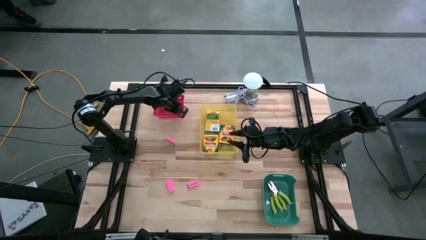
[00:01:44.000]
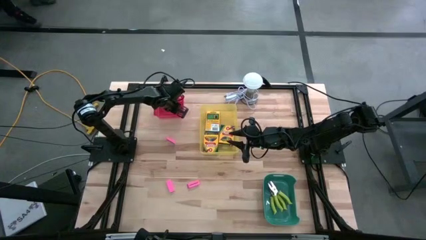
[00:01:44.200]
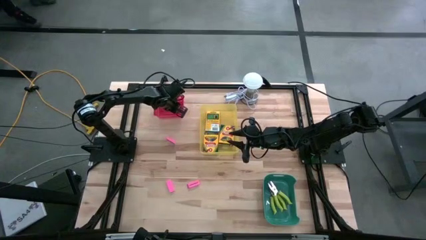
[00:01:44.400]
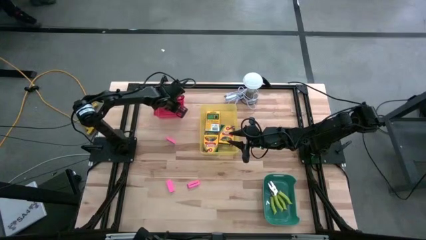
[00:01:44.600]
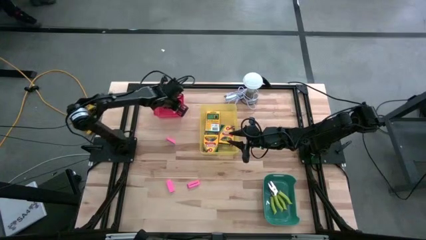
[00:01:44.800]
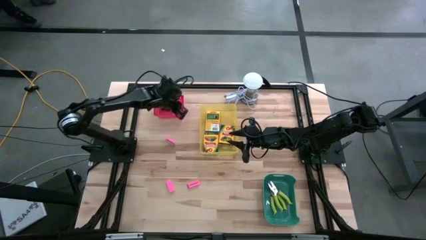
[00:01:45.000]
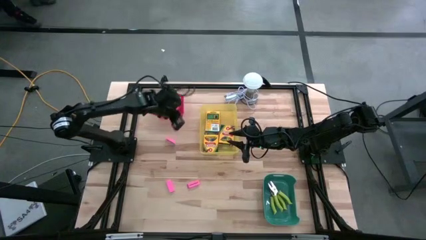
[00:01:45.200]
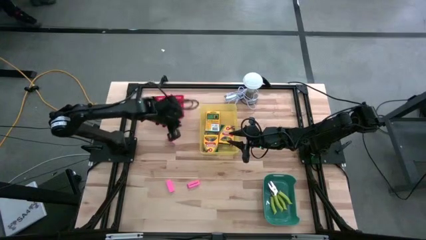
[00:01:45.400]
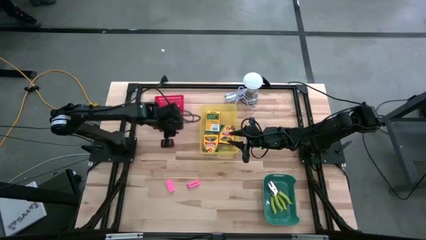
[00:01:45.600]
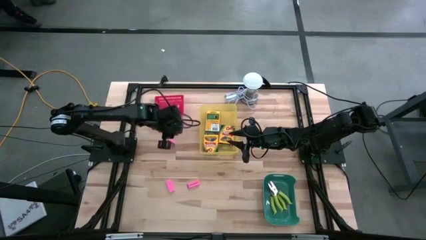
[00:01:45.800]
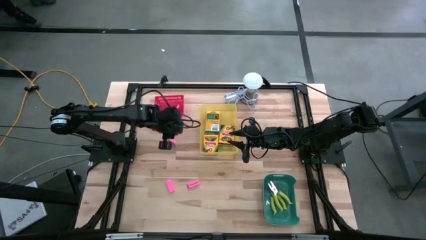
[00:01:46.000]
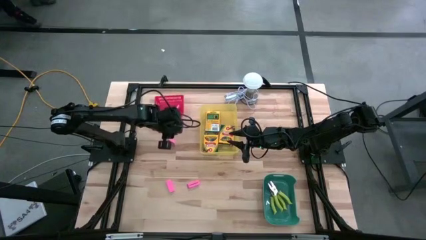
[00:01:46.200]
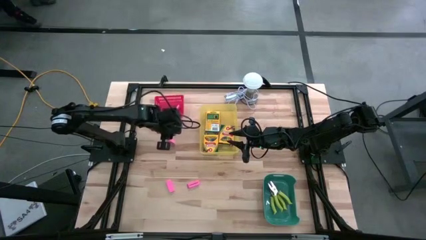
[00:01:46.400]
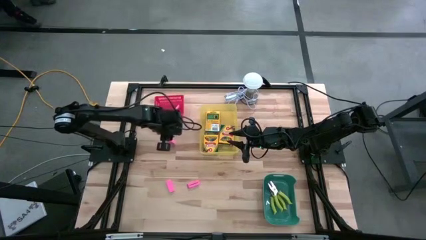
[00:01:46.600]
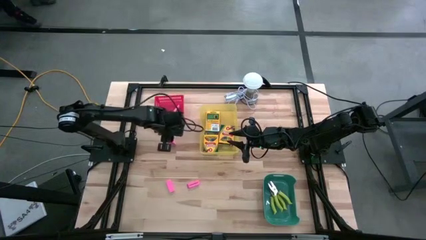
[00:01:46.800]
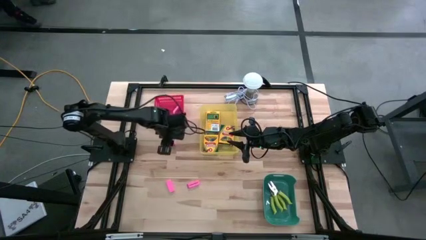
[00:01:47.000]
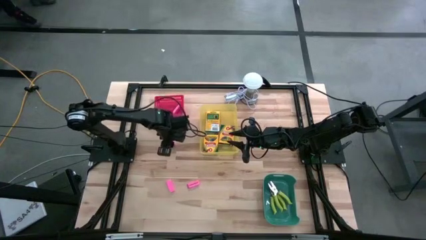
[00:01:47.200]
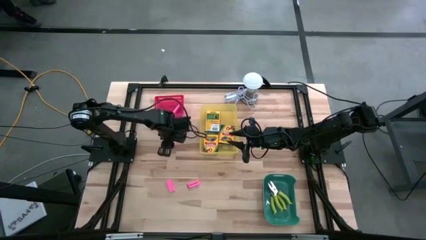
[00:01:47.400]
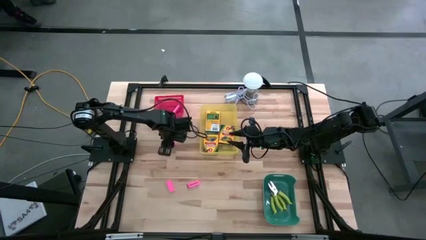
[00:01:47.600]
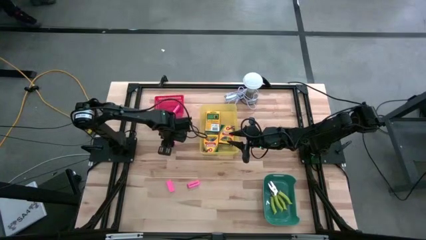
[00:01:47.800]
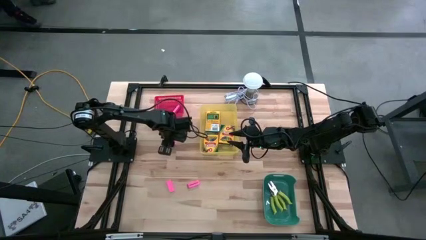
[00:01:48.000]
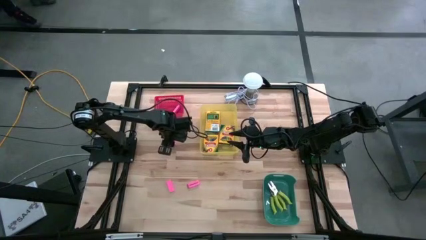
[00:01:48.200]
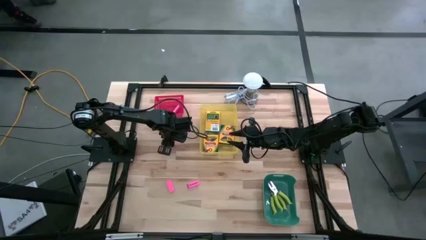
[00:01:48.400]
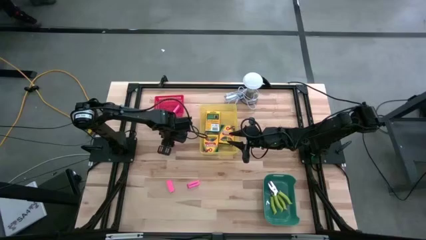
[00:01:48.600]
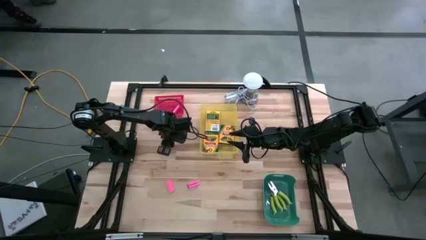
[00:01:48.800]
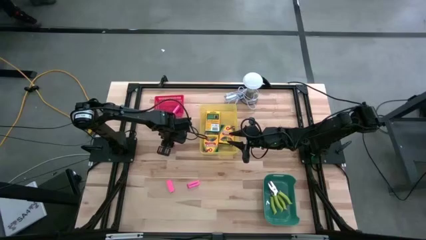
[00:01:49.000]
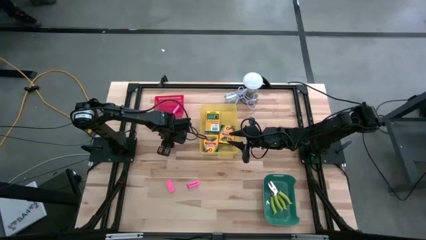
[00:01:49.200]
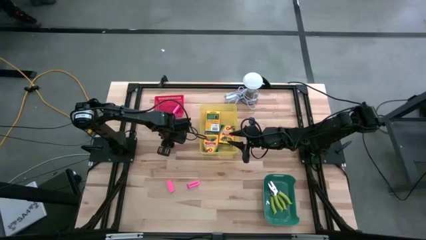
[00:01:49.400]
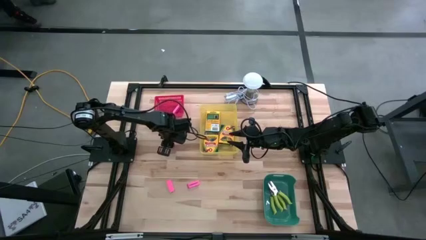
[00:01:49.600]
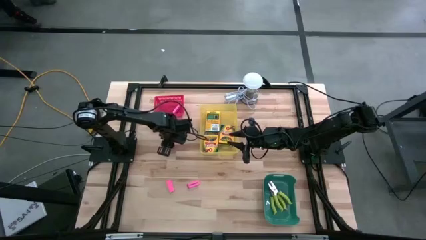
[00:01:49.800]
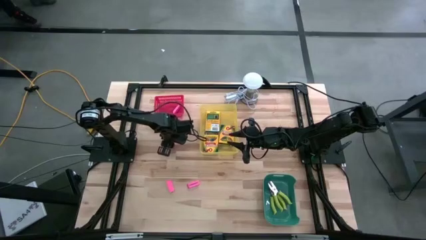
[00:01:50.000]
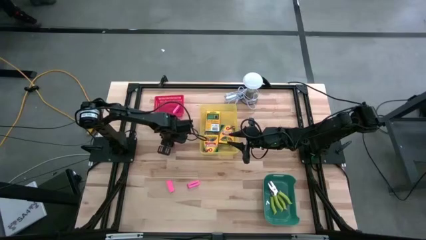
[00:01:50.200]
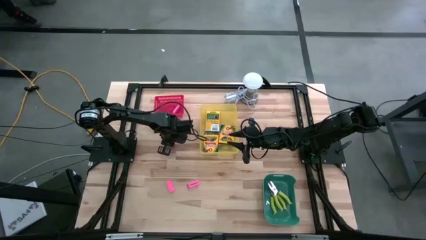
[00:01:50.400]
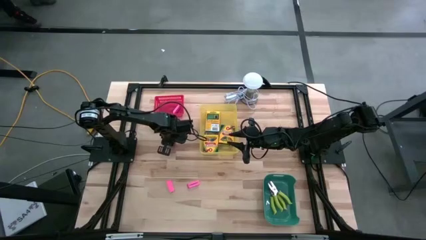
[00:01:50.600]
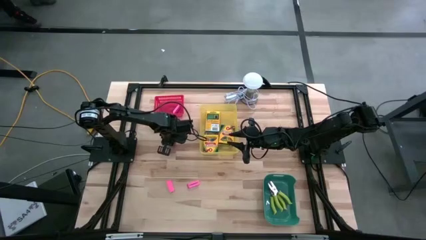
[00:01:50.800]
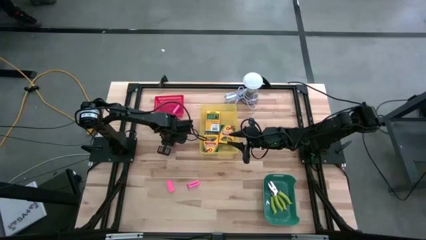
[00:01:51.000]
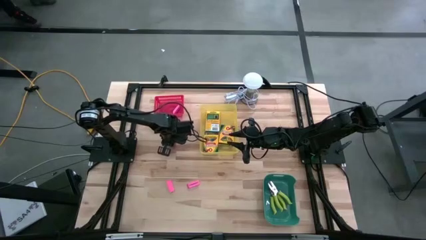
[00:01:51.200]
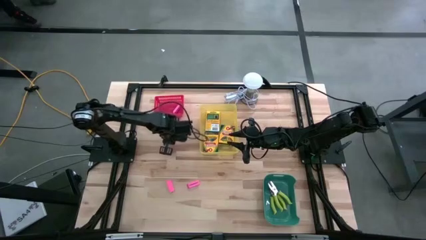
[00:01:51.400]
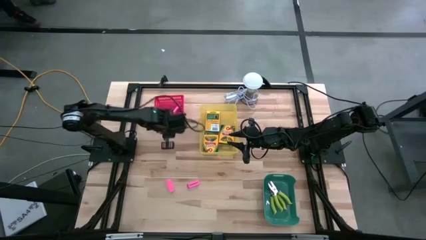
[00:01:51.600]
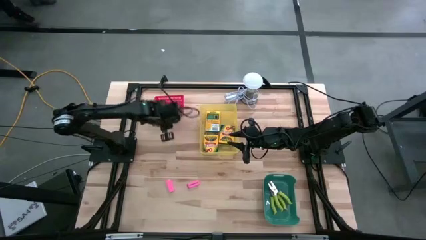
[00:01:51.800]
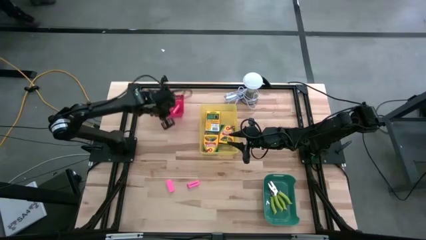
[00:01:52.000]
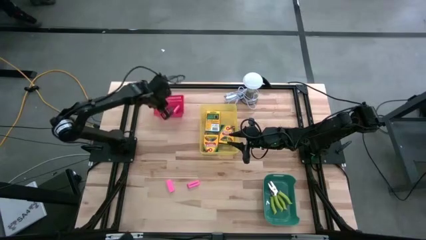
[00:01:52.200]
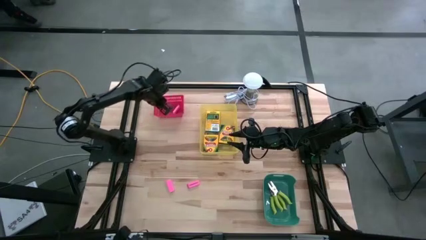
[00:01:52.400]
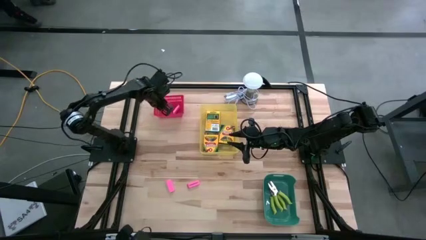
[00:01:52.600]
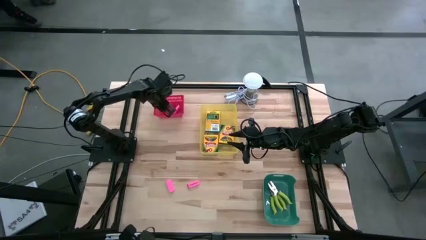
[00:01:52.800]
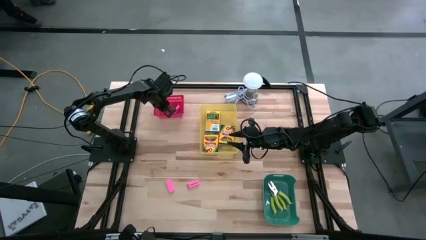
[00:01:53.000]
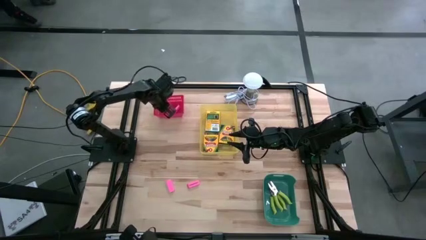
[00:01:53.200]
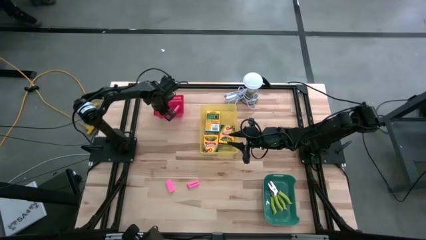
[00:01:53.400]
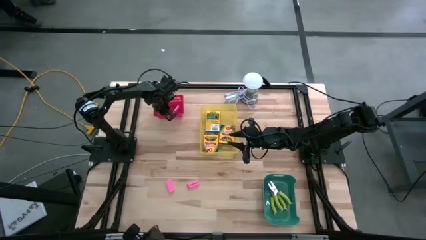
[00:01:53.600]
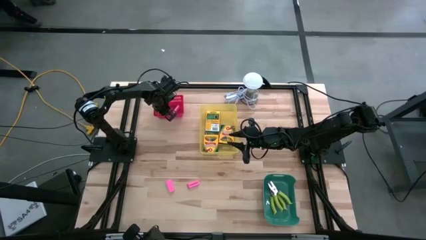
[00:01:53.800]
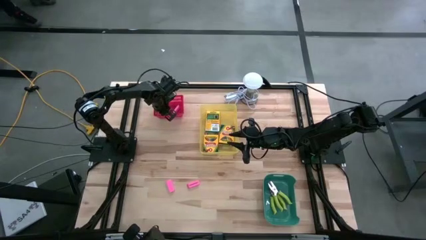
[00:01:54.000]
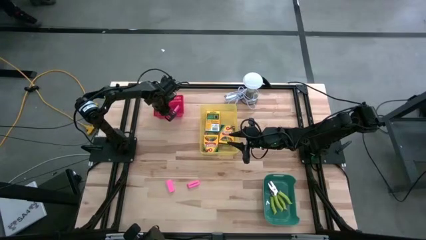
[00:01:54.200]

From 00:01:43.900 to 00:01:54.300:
Task: Pick & Place School Supplies
Put the pink eraser into the red bin

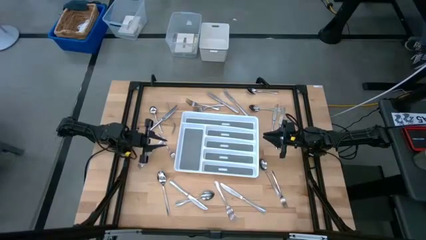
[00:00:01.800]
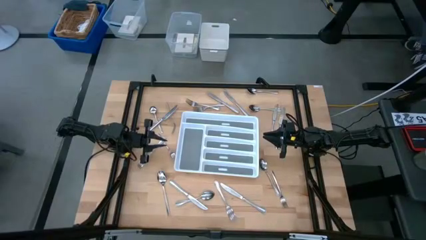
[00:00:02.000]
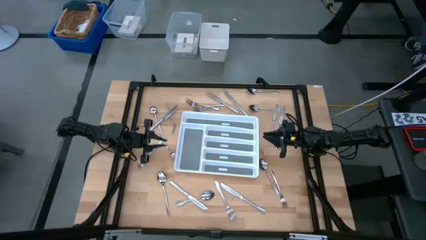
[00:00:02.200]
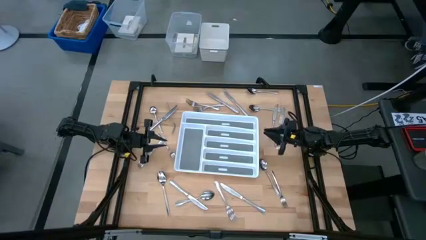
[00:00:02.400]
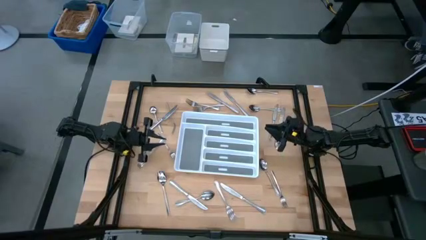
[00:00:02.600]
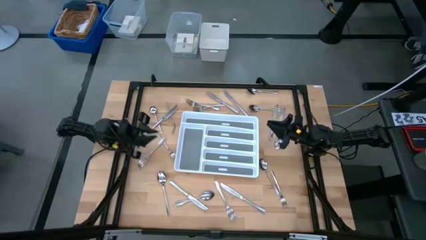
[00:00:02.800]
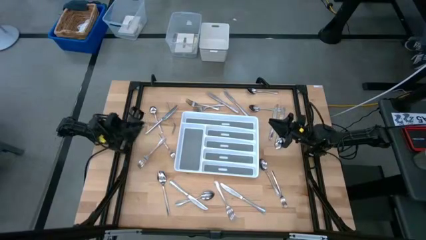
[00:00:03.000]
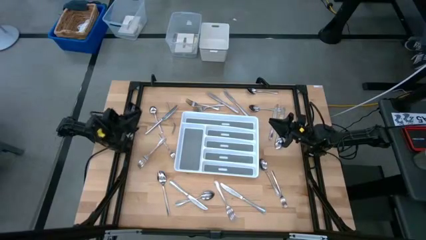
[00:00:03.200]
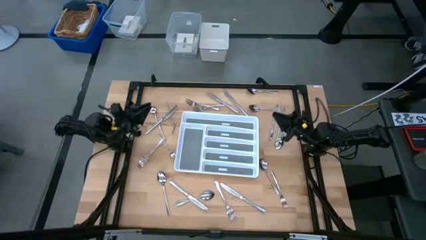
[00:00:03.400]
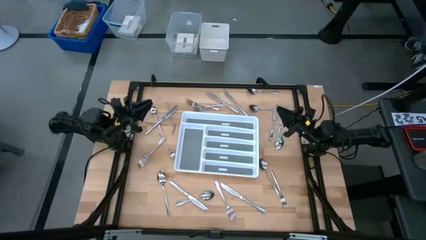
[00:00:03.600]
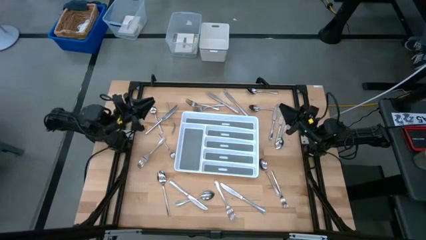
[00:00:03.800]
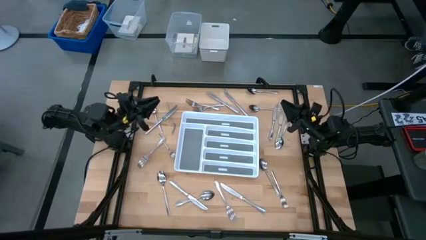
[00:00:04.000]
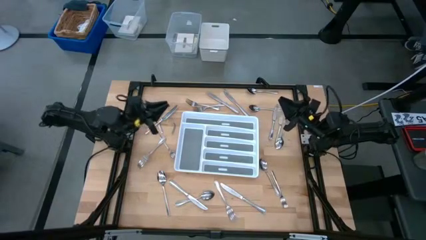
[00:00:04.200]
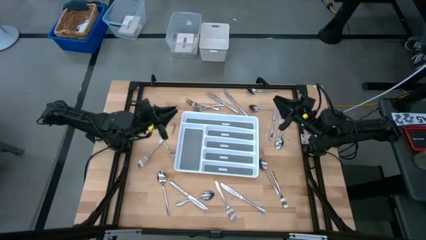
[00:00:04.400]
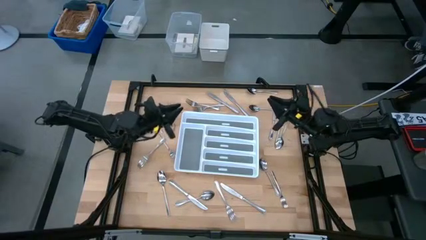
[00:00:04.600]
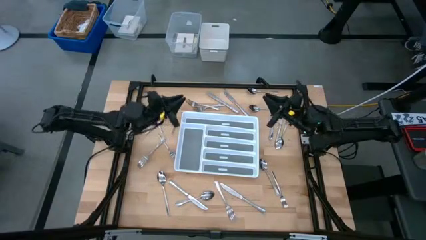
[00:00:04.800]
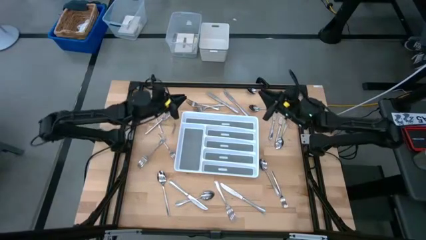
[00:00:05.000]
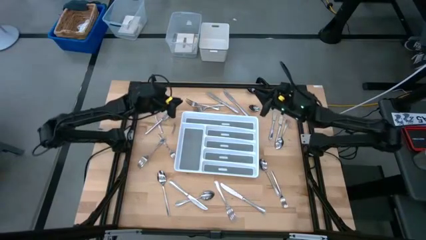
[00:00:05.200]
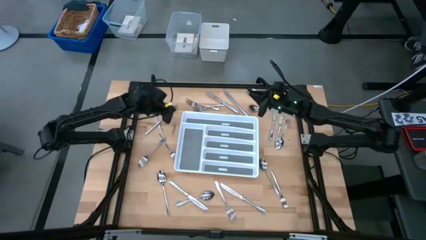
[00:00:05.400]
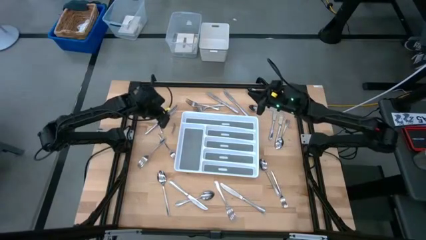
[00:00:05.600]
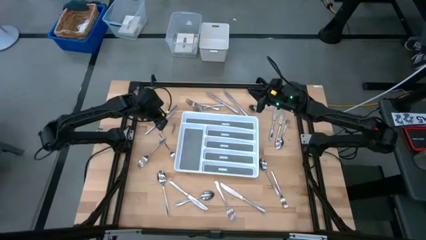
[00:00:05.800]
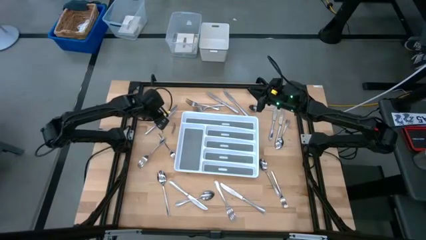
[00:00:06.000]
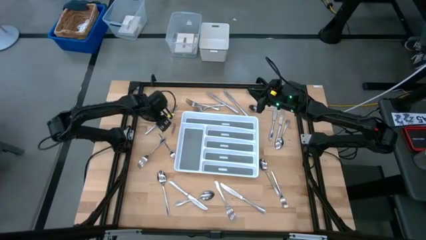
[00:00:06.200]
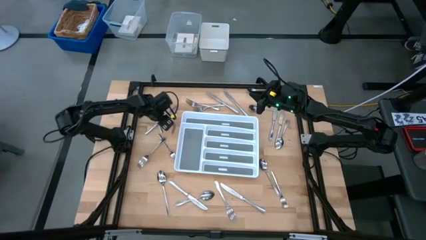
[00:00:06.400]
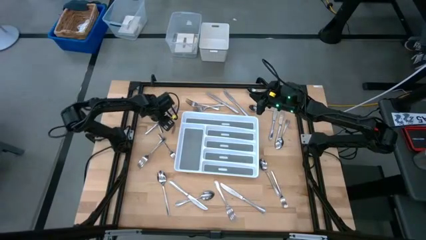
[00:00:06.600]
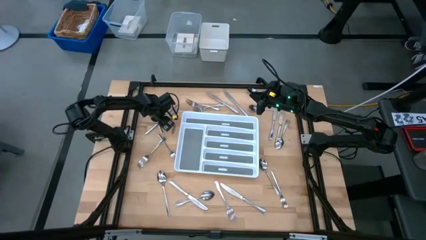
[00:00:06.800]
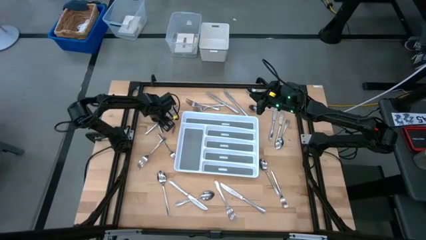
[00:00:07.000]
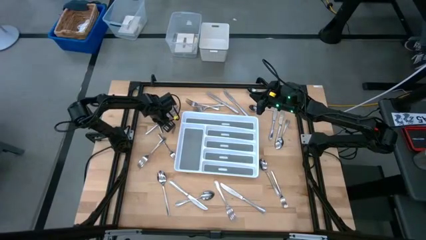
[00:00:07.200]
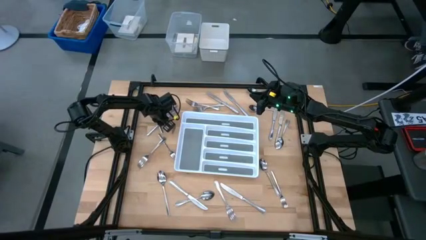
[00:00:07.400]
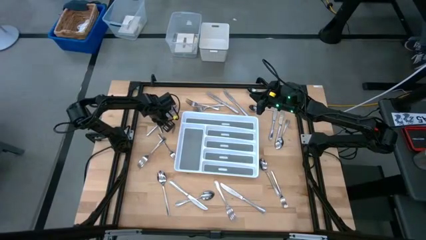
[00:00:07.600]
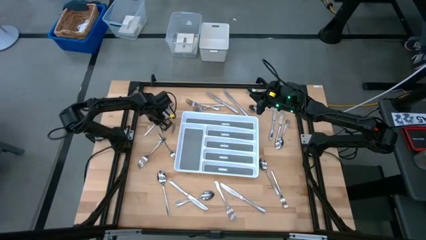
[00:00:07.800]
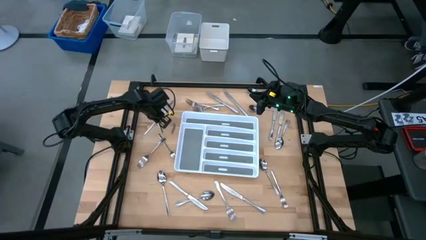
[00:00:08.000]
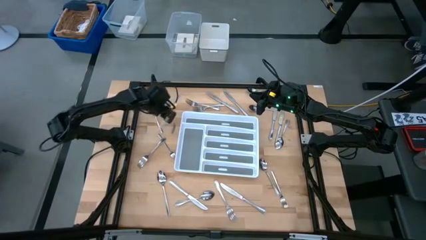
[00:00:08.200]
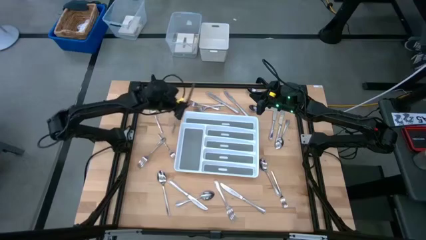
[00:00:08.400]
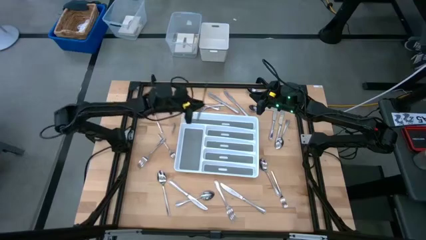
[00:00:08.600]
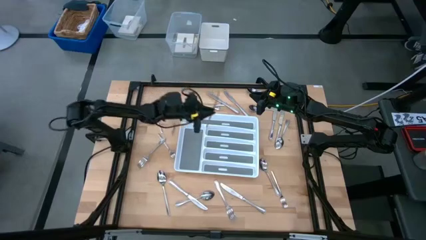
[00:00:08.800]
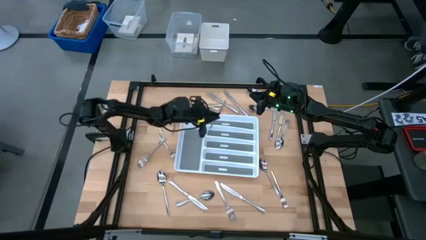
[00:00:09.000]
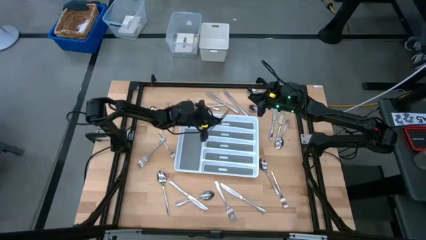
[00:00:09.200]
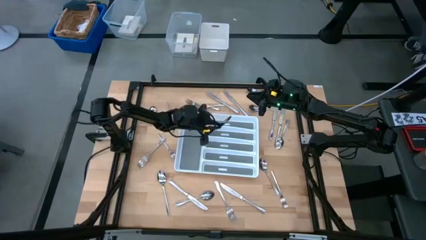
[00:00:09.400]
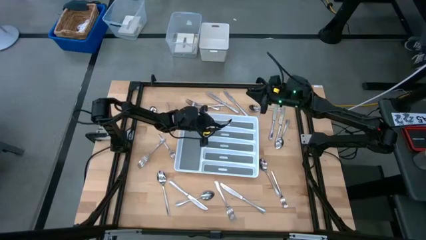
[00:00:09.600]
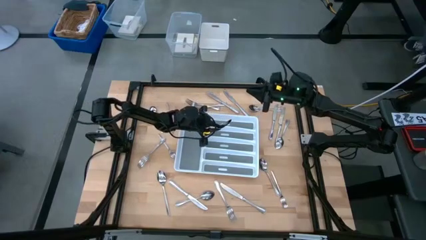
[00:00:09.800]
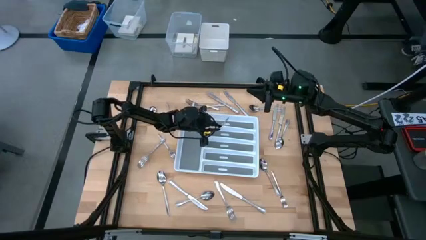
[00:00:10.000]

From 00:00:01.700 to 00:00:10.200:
Task: Sort silverware
Put the knife into the organizer tray
